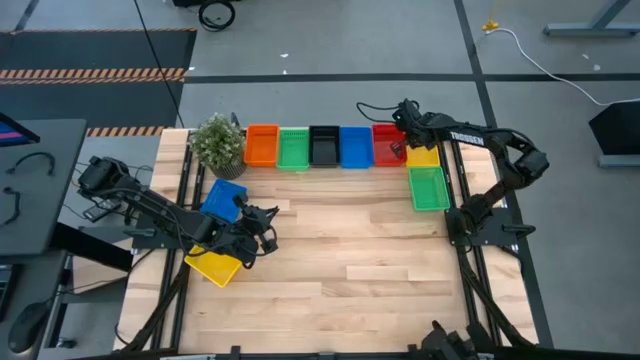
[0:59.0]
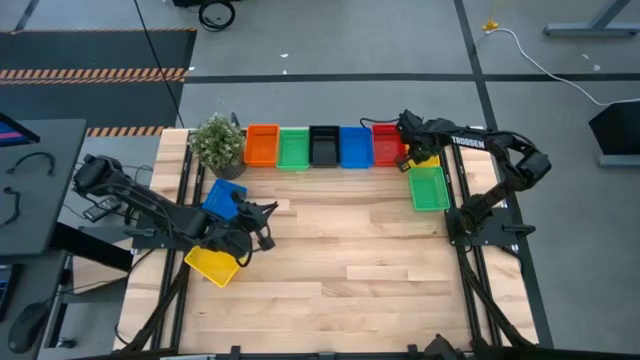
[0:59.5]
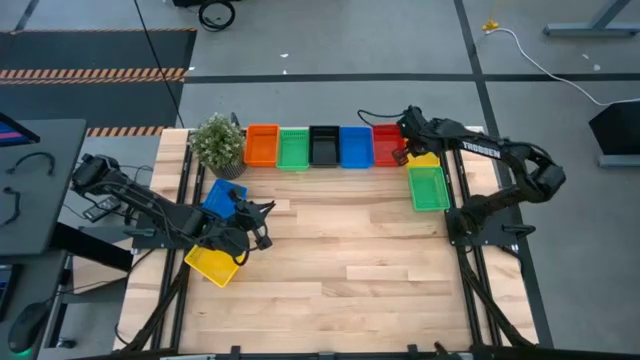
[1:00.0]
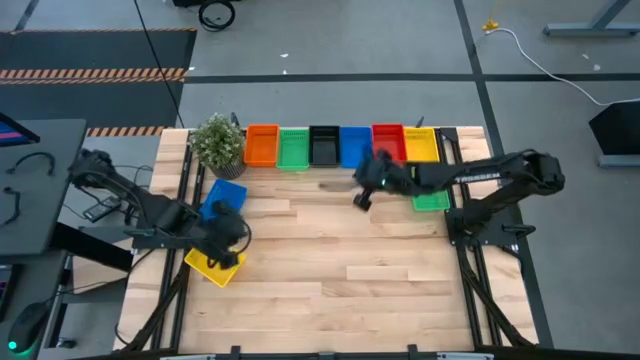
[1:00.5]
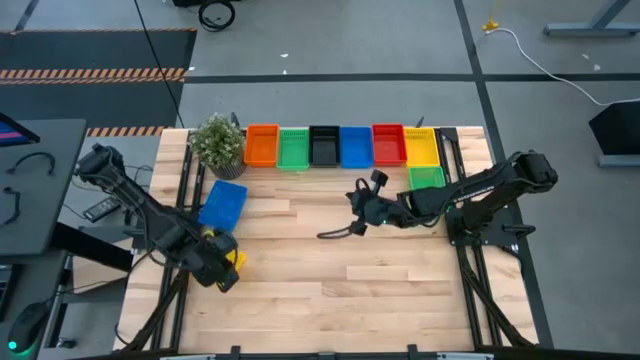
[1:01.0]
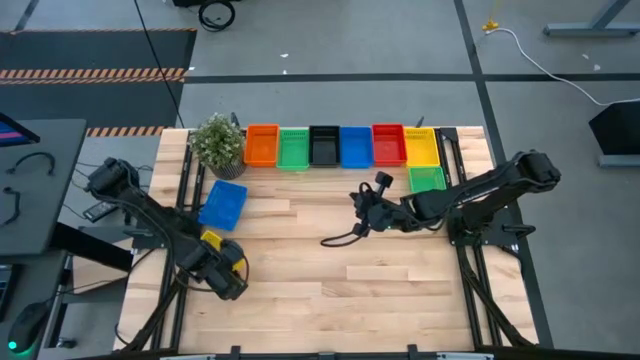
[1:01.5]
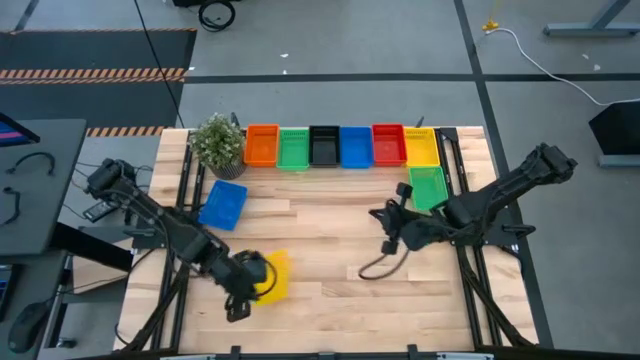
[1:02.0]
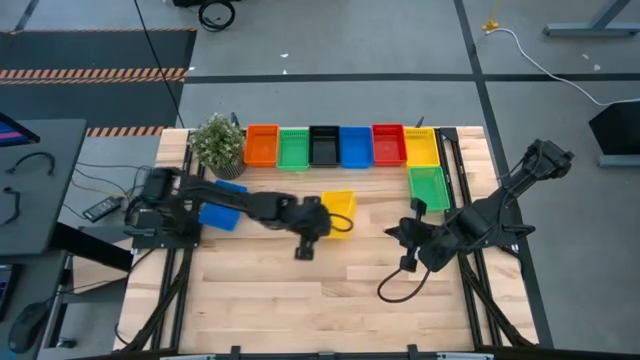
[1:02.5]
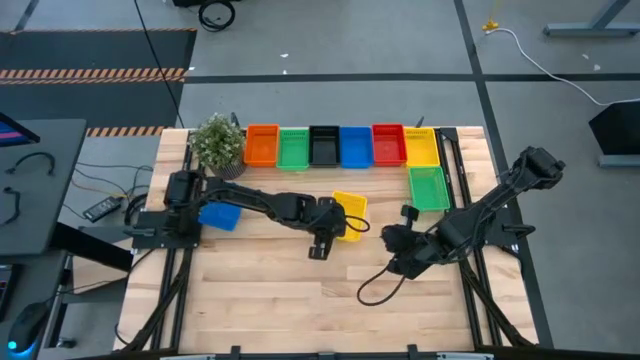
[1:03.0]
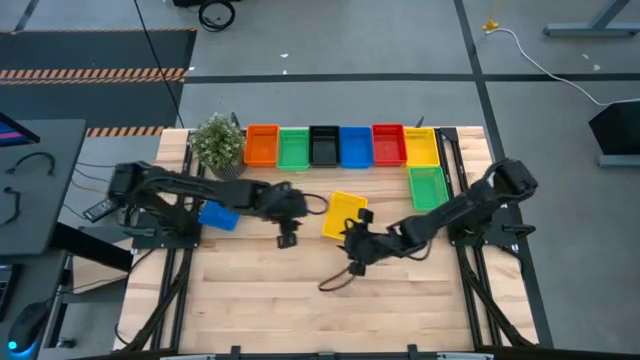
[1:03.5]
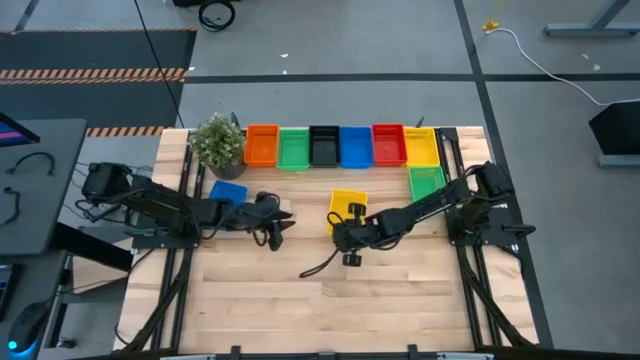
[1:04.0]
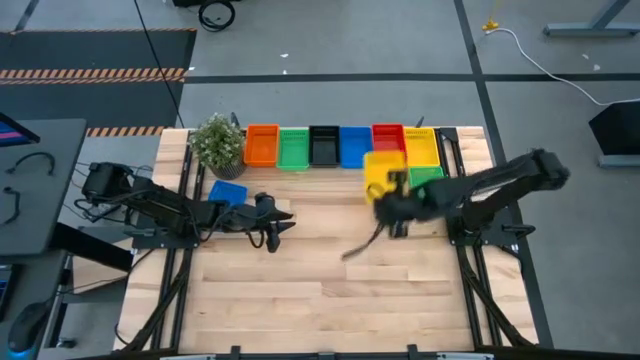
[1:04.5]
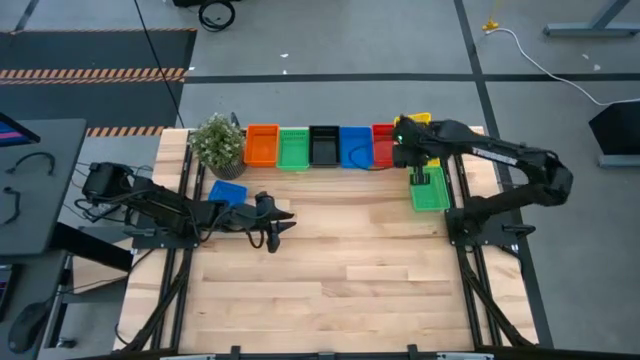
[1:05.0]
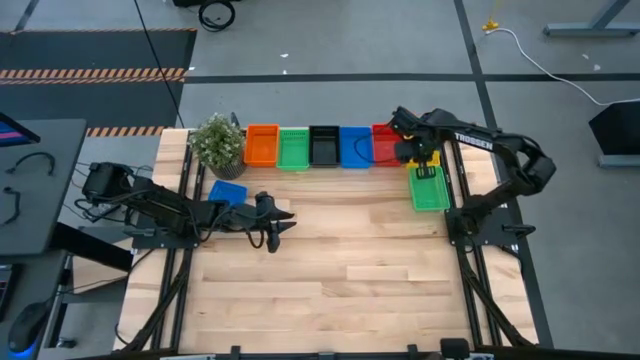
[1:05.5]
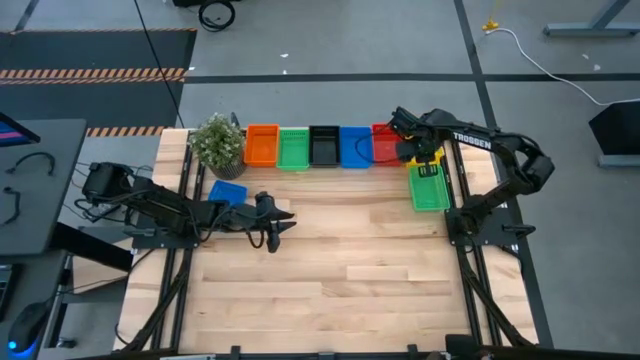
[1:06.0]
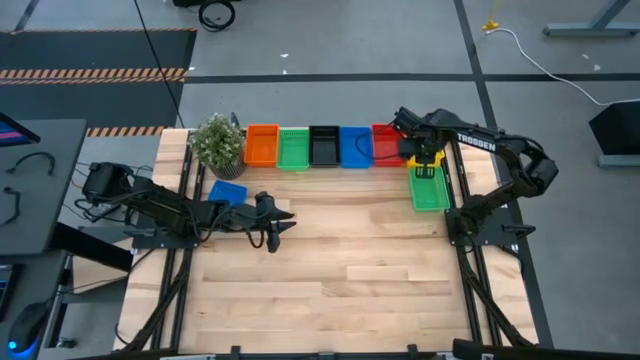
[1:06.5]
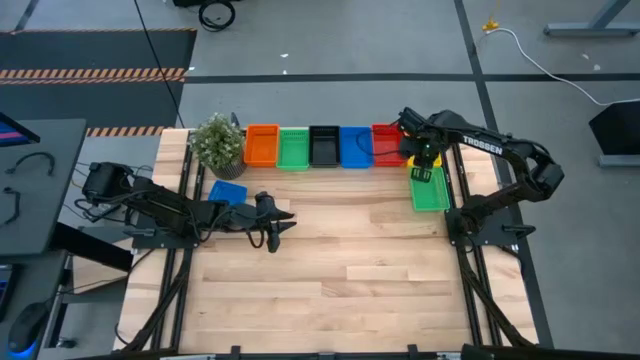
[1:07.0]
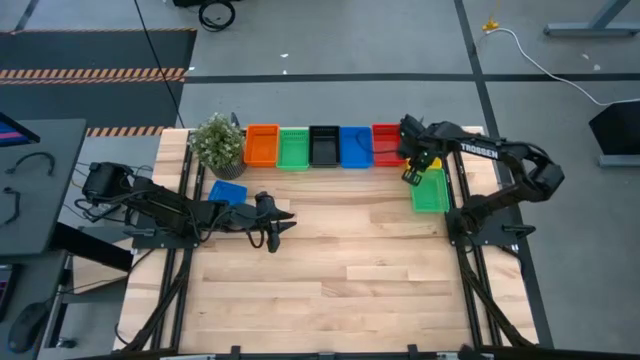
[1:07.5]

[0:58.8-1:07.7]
Stack the bottom yellow bin on top of the top yellow bin

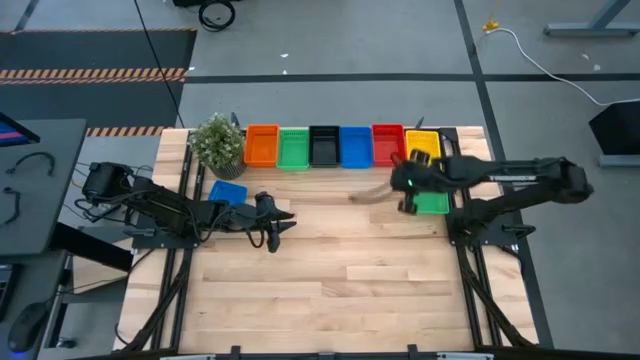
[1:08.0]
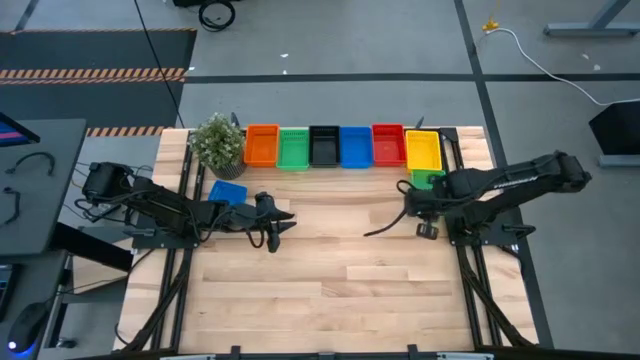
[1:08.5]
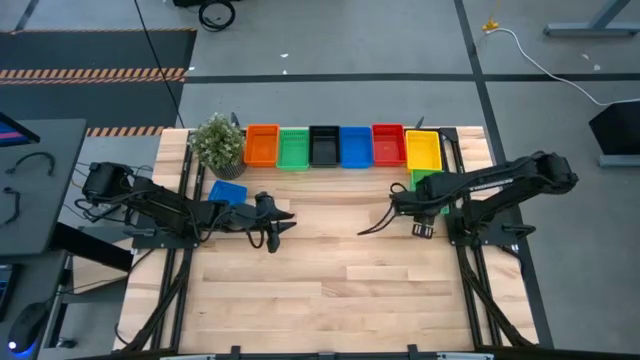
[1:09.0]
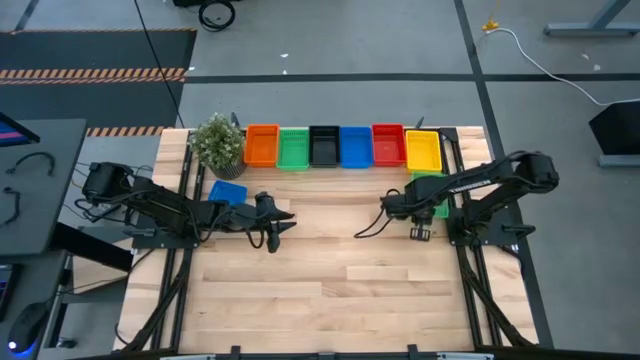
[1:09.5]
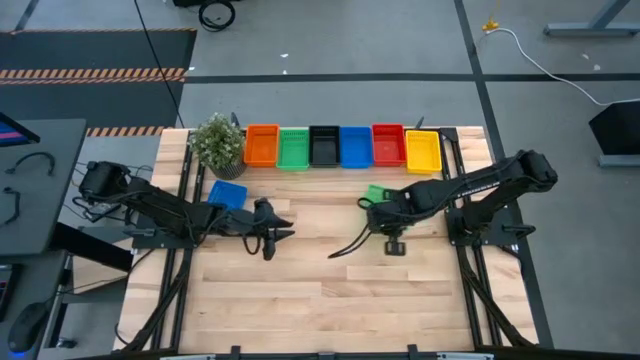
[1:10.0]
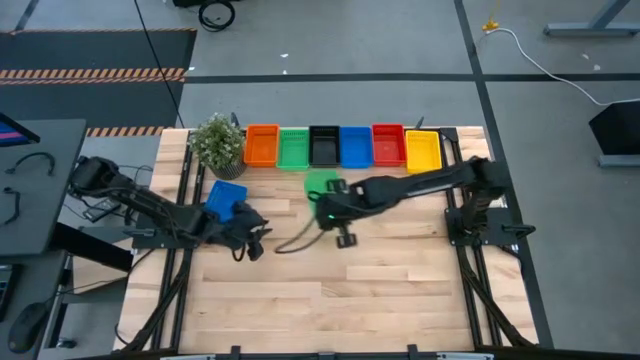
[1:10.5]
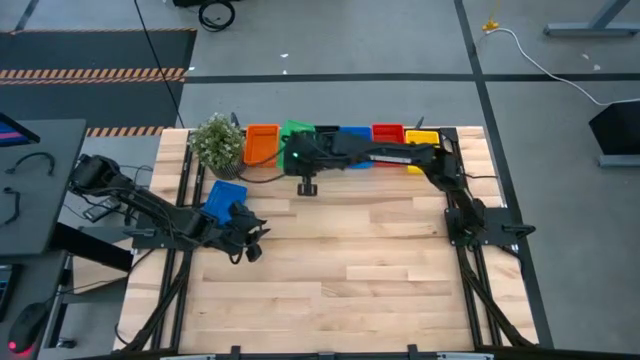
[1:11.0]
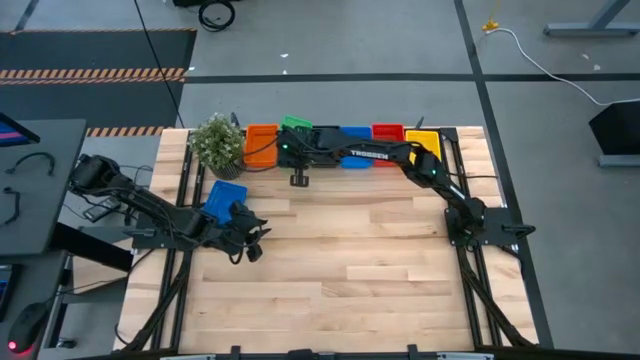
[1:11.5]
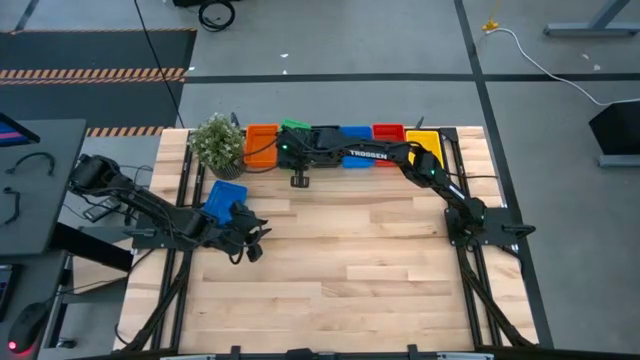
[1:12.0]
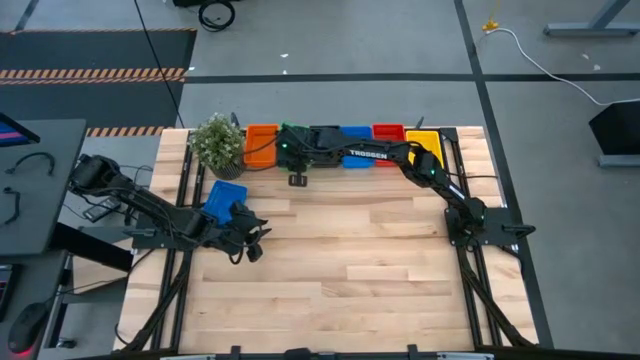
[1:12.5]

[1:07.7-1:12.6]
Stack the bottom green bin on top of the top green bin

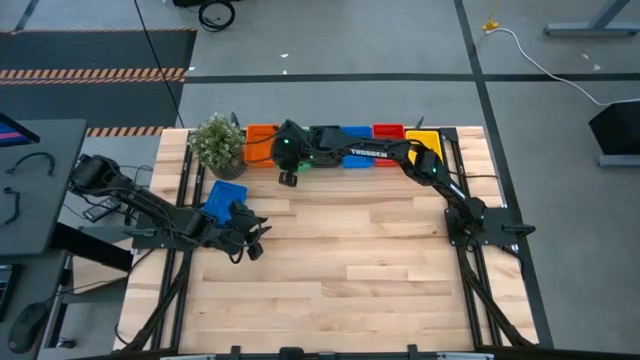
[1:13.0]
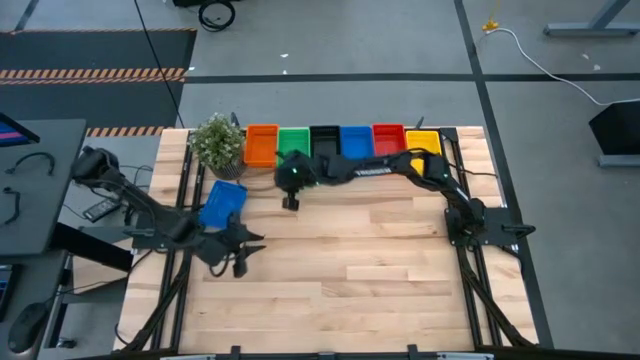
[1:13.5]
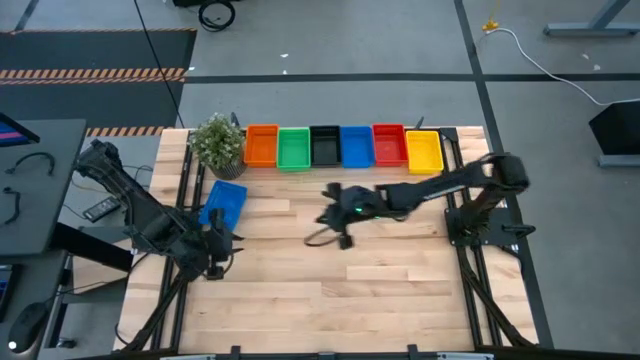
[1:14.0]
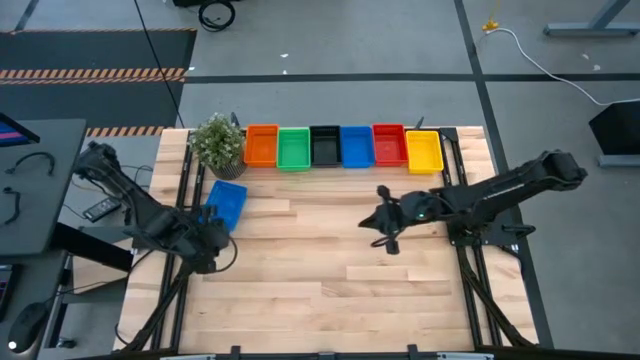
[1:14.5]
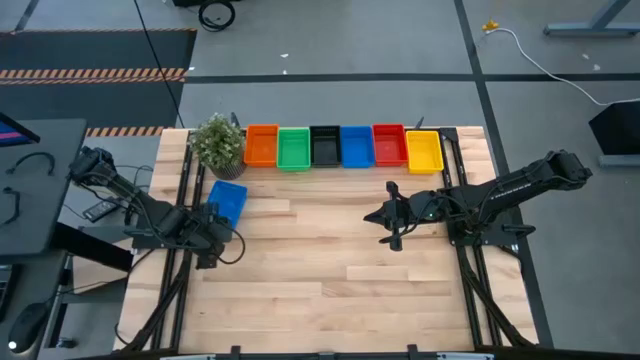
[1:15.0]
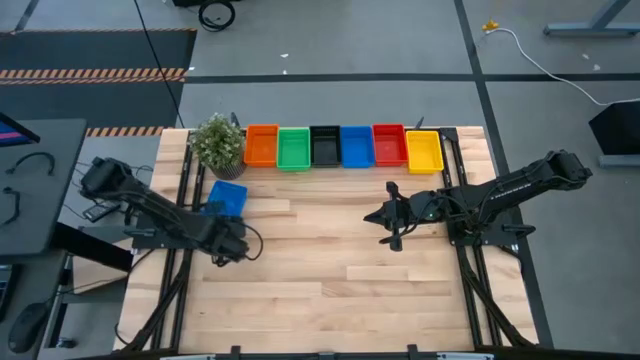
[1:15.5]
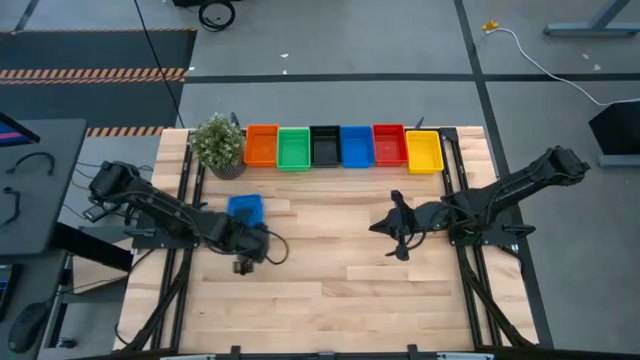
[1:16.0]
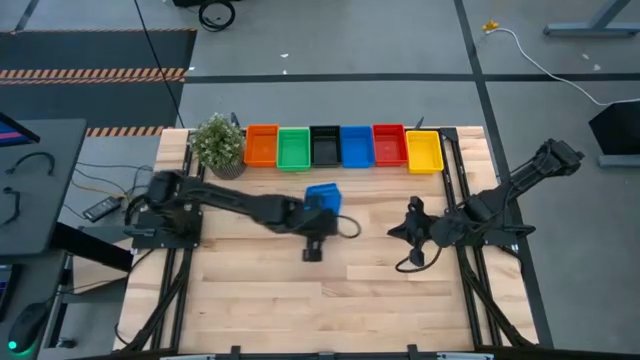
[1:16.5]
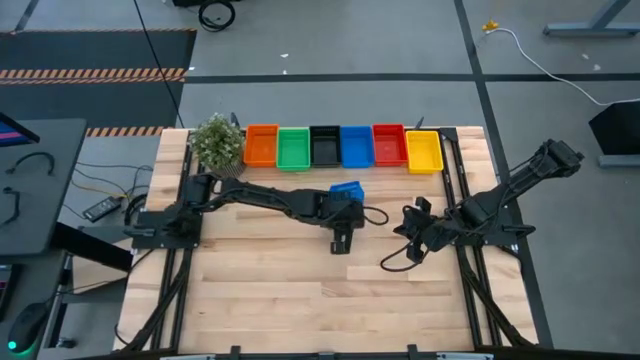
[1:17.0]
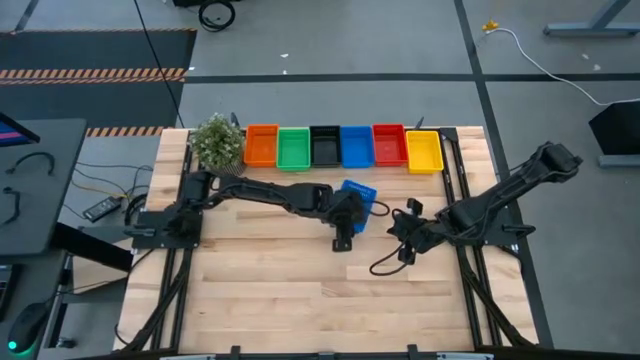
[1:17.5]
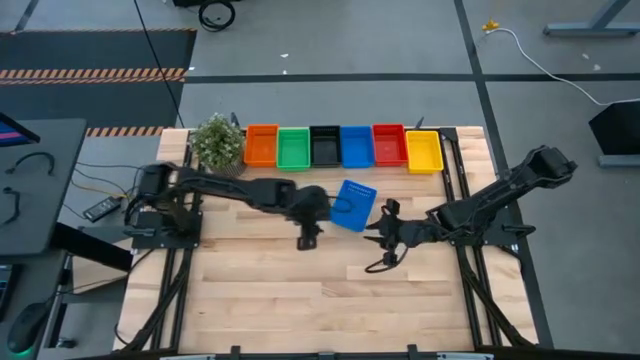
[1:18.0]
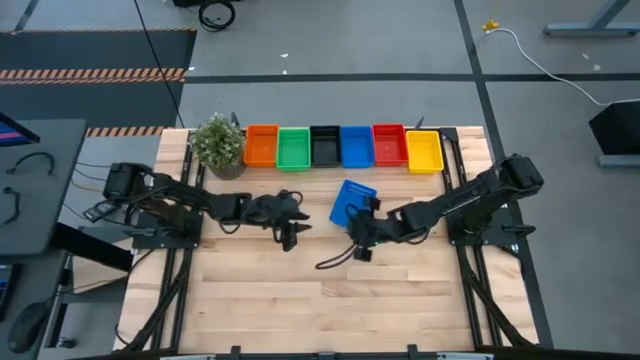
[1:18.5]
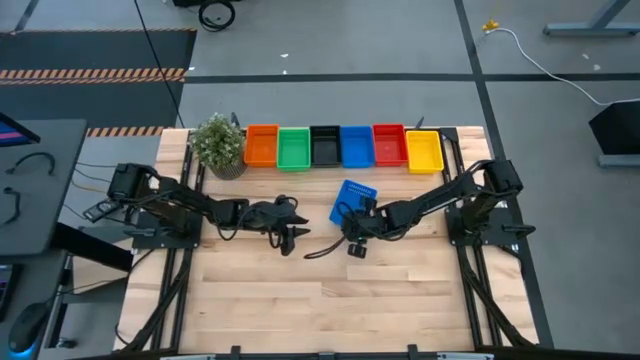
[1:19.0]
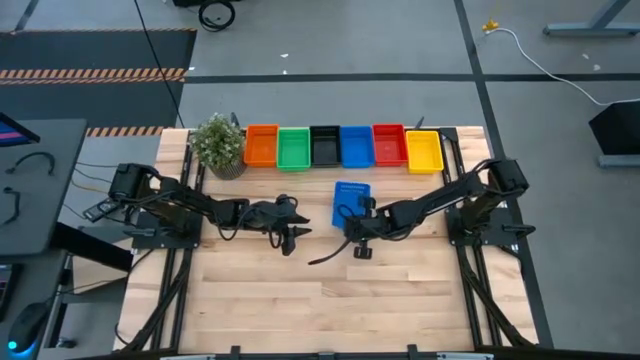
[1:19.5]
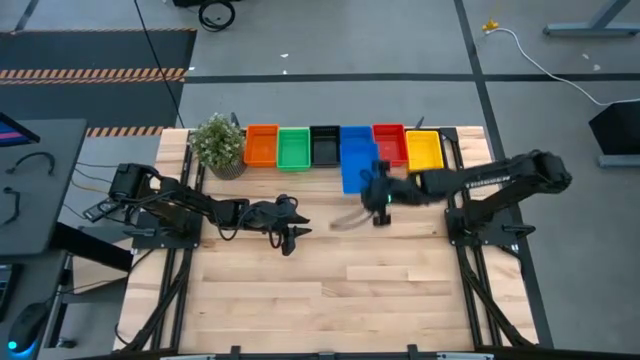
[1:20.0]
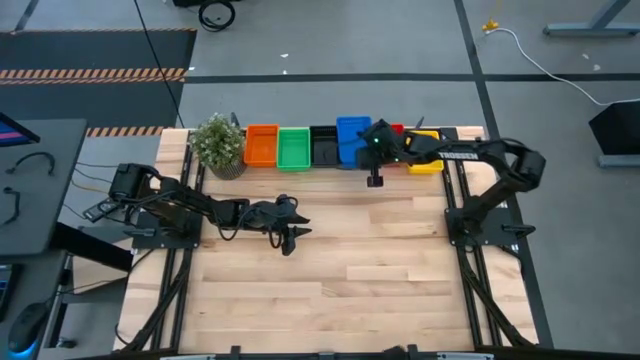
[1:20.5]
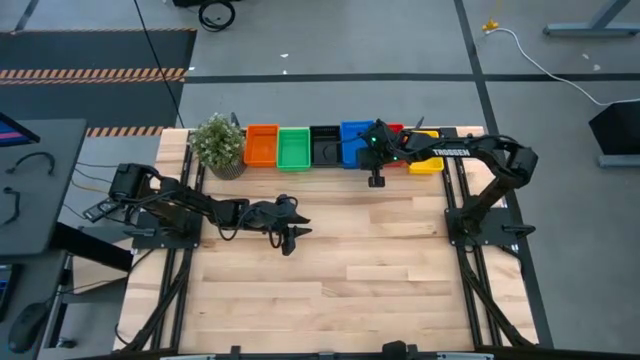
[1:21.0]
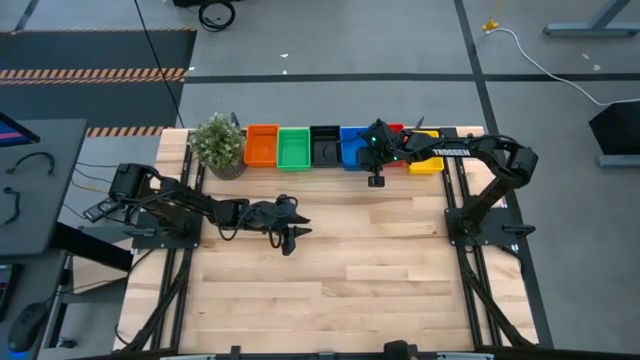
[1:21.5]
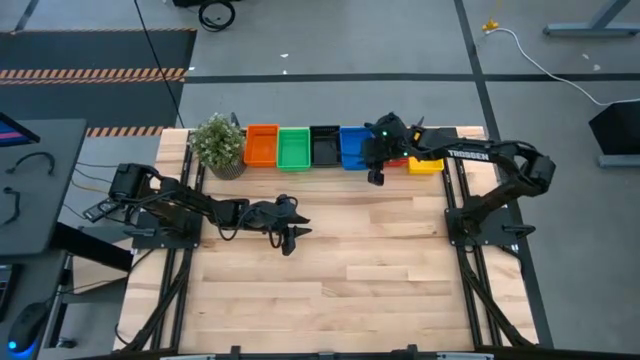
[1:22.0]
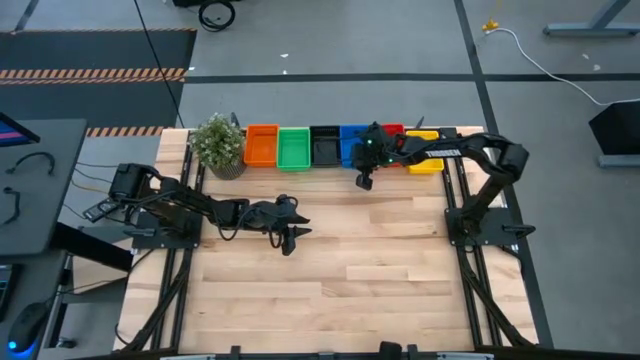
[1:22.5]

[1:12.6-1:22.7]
Stack the bottom blue bin on top of the top blue bin
